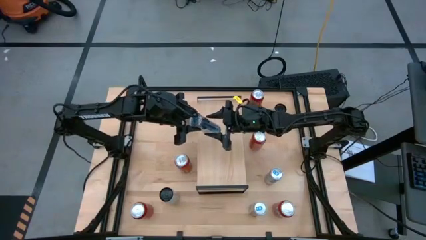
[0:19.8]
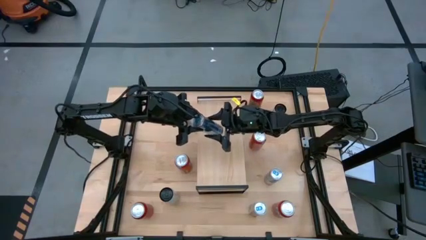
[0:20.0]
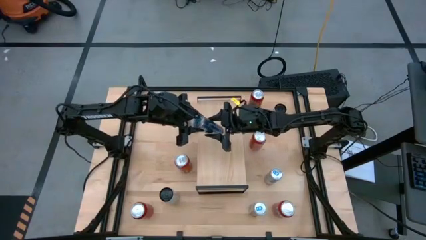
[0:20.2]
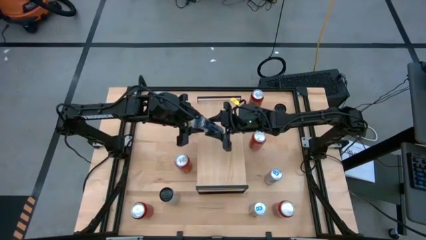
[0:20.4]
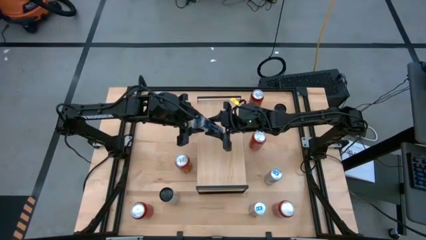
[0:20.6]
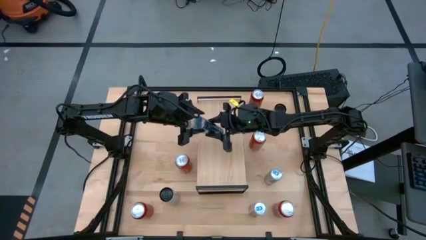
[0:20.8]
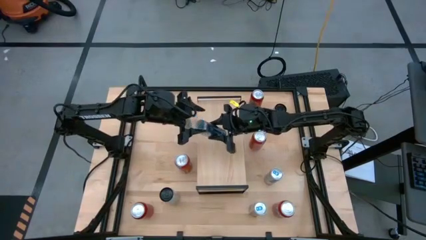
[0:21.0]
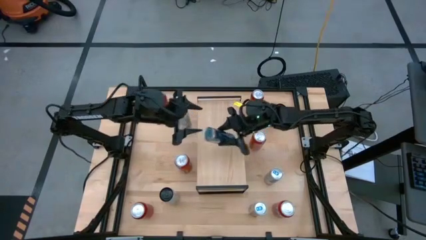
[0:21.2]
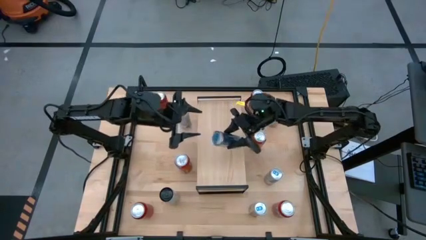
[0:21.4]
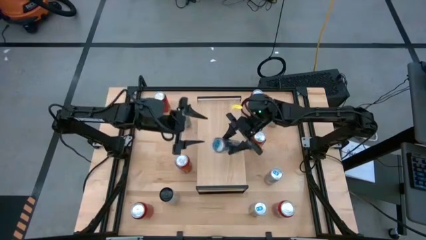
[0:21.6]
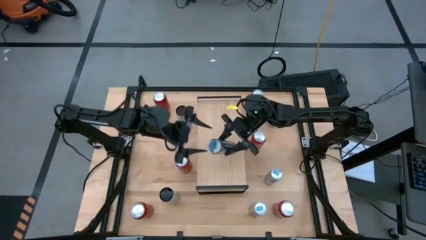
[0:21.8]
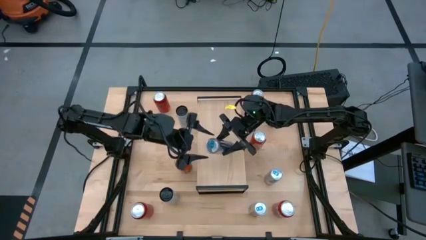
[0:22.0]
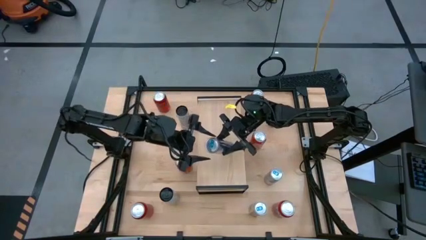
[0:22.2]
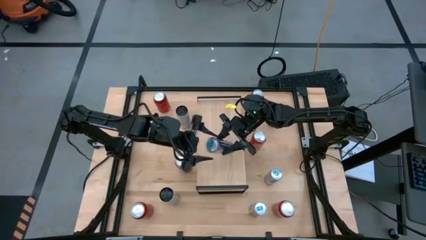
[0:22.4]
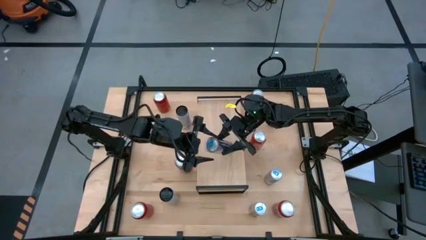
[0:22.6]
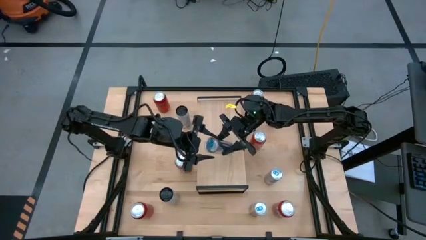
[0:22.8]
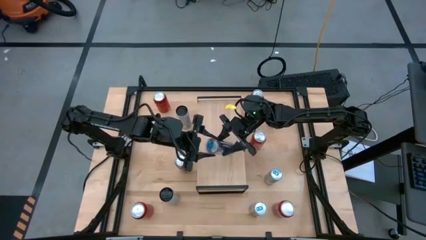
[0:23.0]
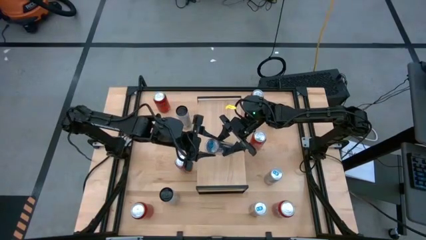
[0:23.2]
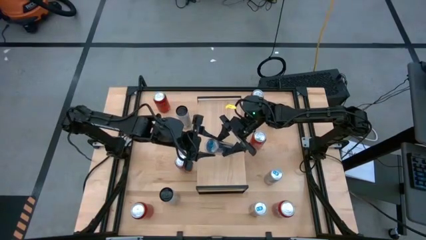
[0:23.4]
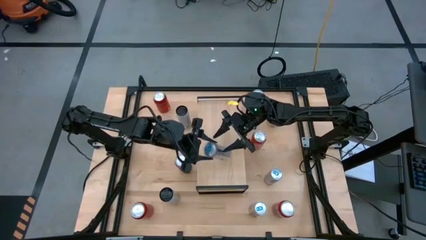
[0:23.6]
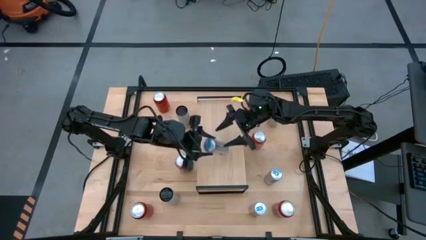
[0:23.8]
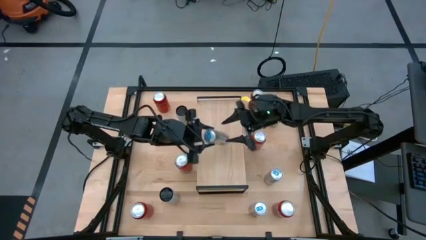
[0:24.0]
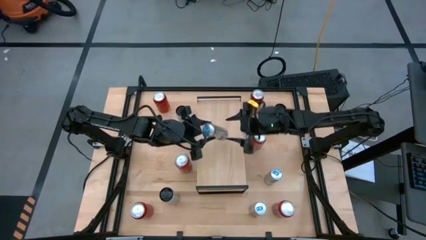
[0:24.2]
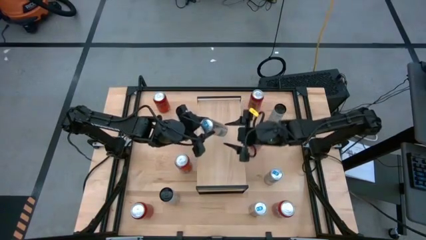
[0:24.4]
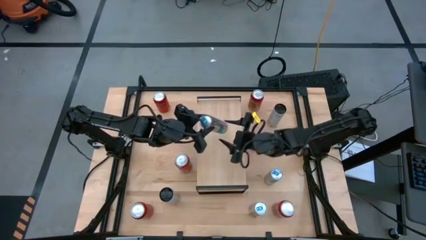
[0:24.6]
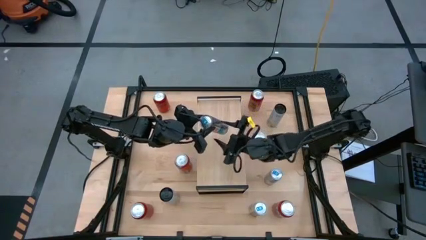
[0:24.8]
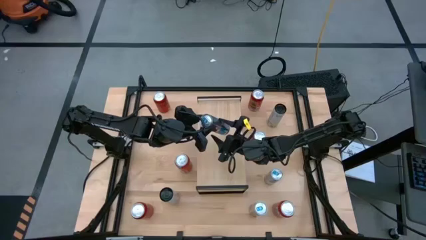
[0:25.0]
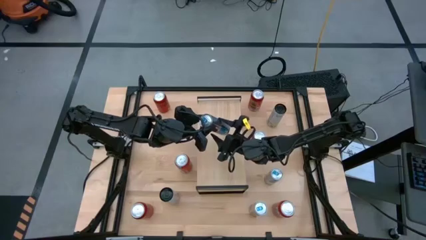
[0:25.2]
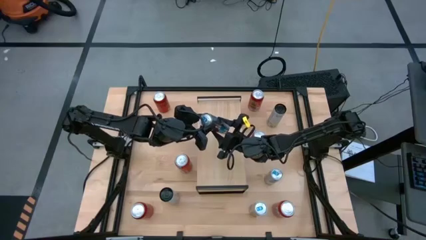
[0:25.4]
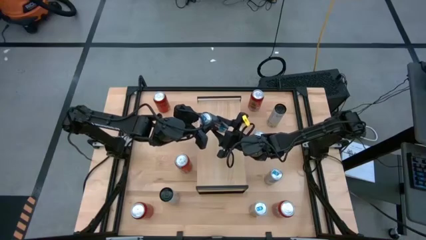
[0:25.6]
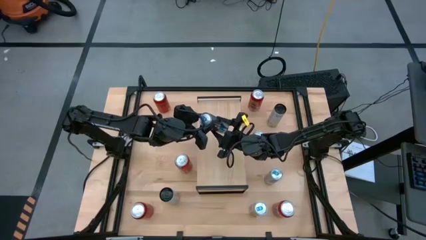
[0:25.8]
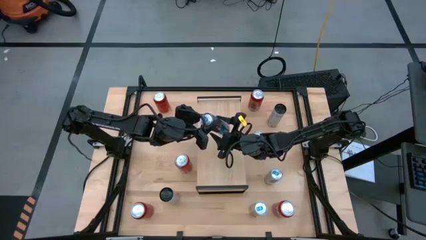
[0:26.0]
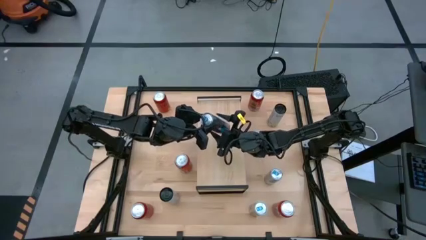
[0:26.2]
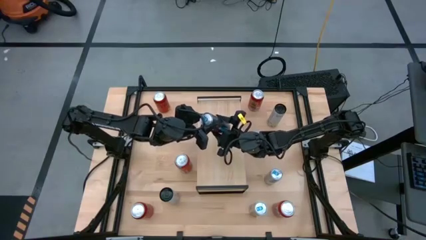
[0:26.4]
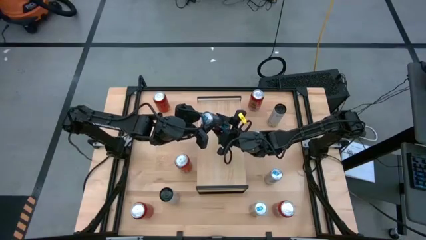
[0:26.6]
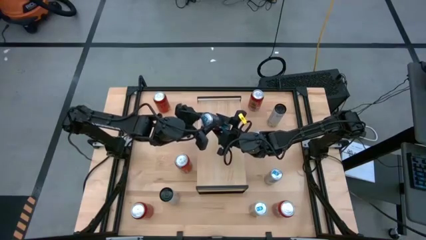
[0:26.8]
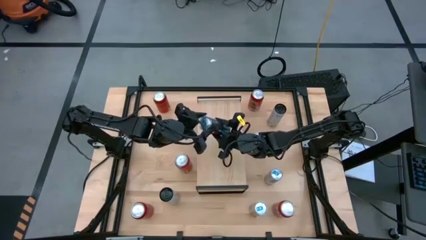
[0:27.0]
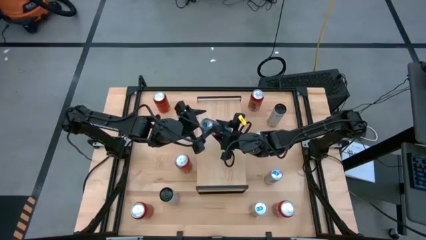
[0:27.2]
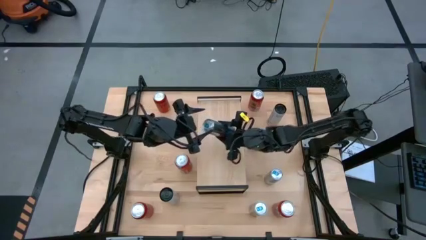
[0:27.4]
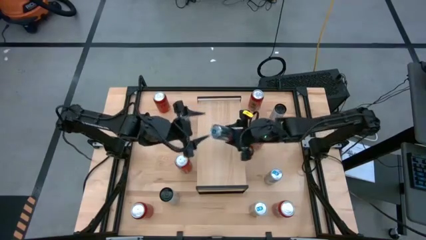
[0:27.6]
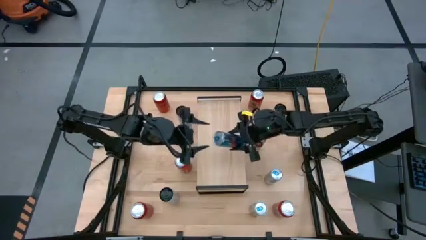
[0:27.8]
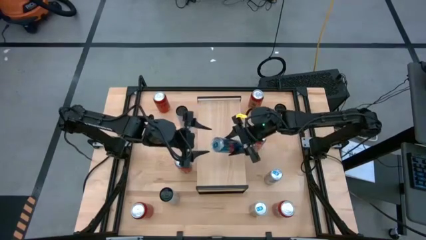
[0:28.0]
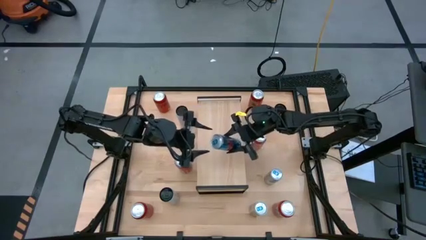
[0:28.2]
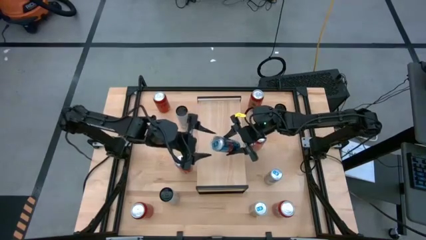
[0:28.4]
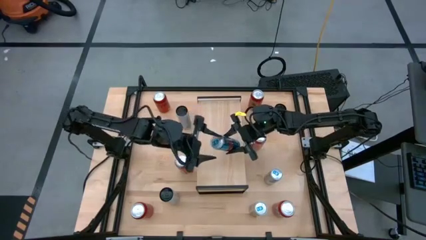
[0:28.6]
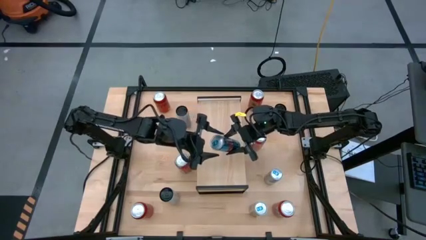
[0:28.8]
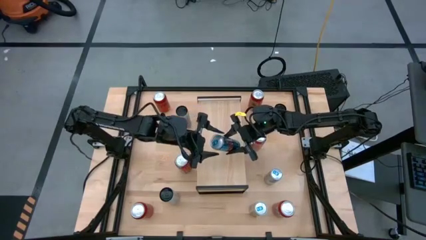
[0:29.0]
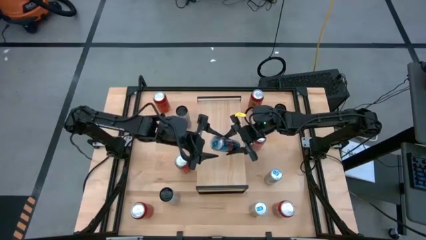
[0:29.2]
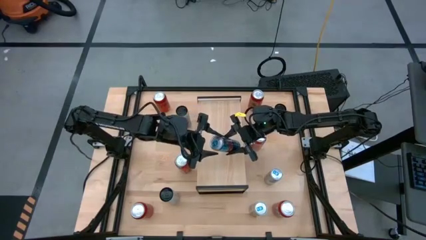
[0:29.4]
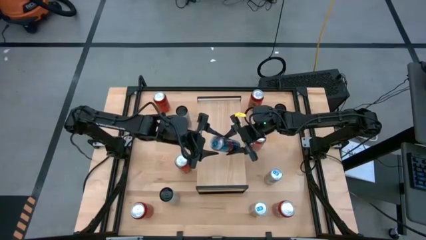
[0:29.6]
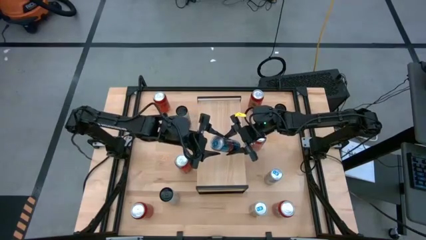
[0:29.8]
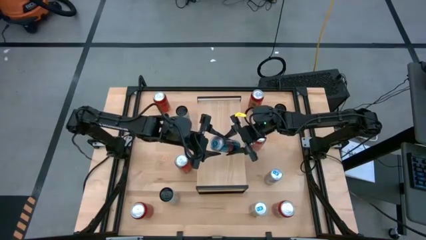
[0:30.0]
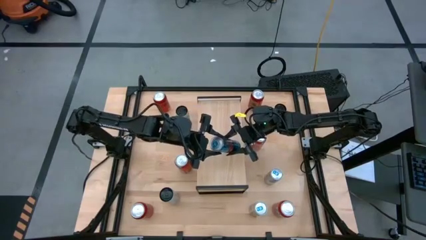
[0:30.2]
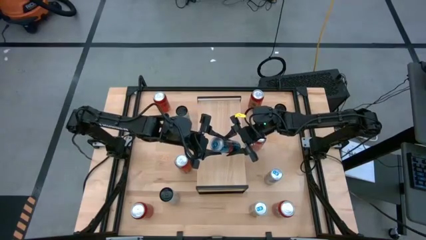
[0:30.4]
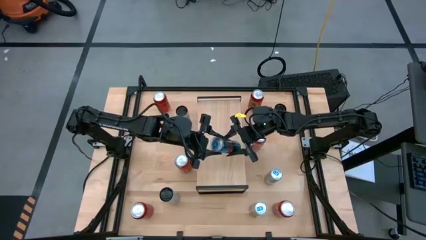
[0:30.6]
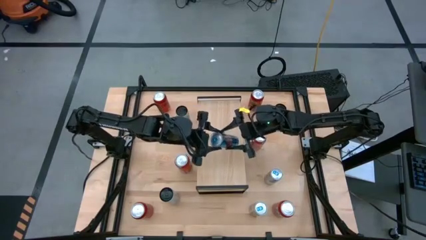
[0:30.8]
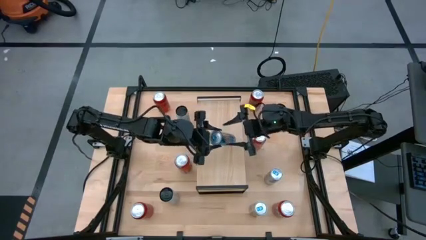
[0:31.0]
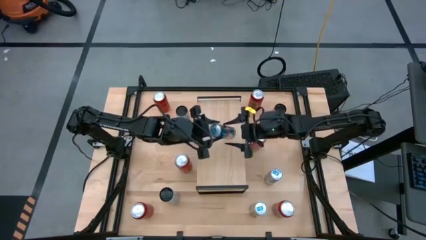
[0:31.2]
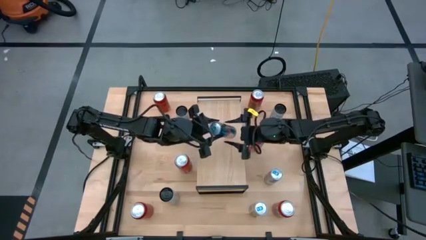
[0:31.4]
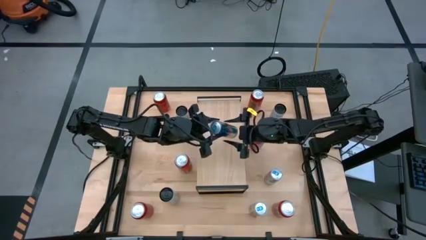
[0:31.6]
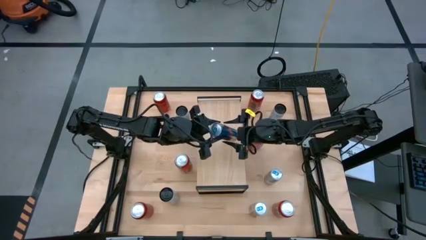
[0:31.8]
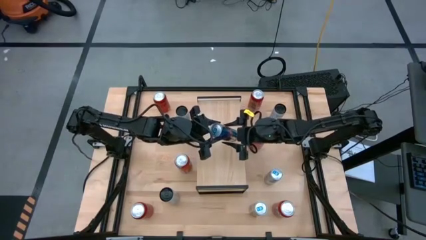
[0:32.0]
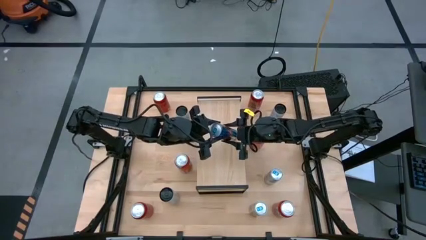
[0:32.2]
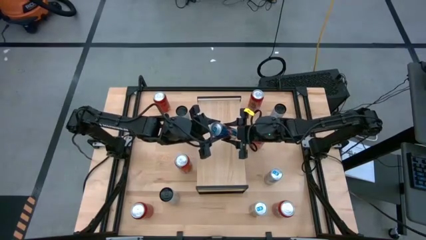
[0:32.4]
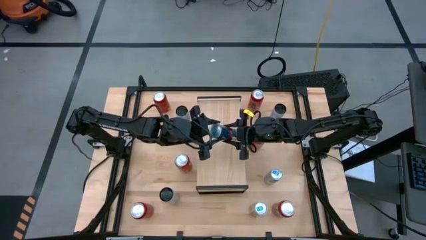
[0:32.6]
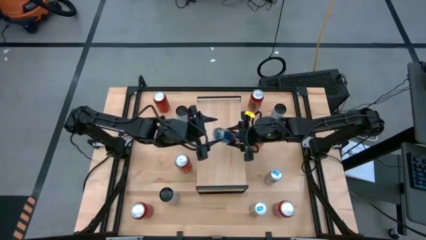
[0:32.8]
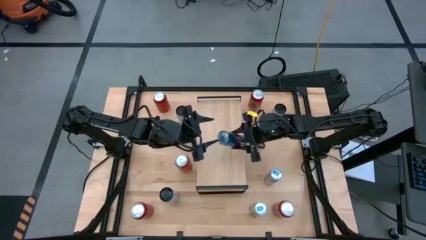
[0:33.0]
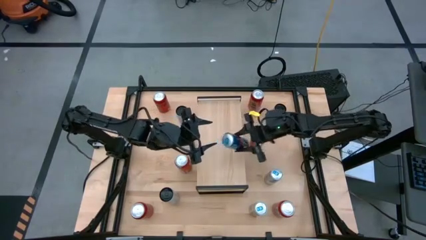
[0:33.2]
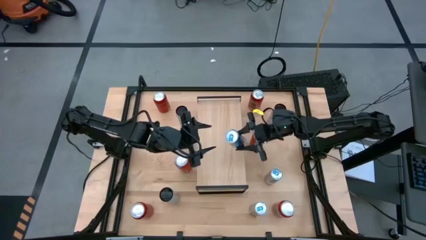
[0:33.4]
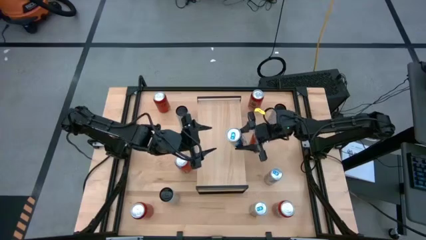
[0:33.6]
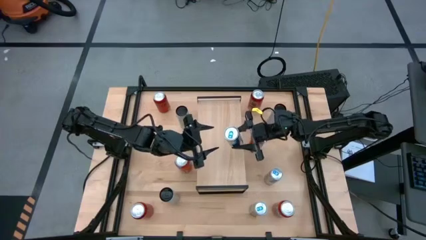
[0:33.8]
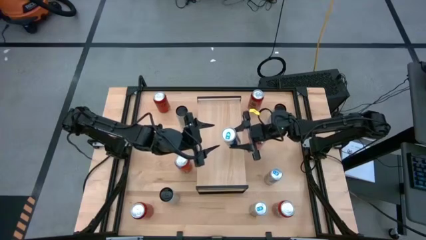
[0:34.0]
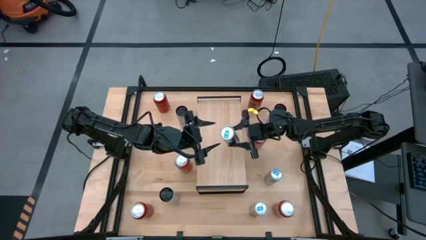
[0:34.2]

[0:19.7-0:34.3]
Task: Place canned beverage on shelf
Put the top left blue soda can on the shelf
